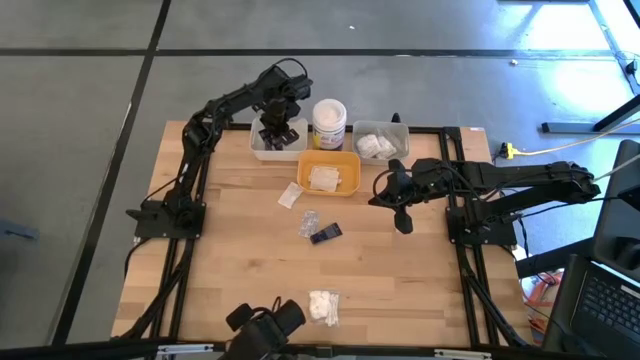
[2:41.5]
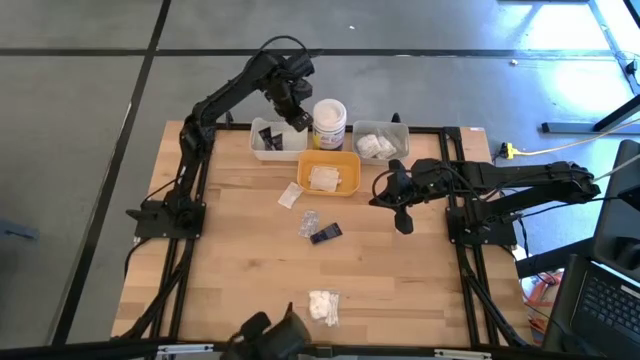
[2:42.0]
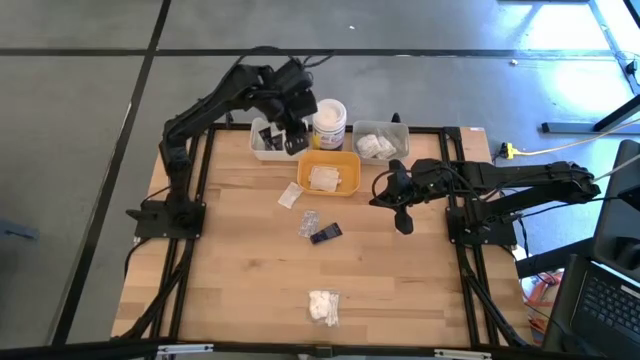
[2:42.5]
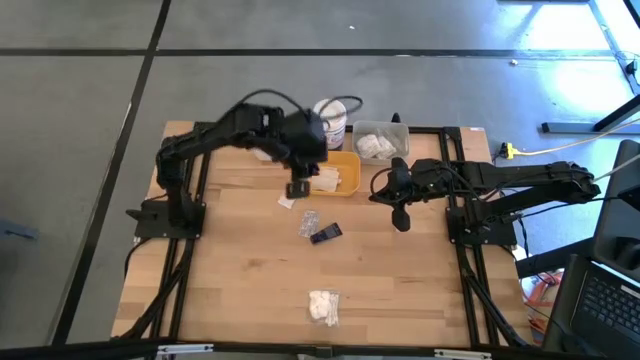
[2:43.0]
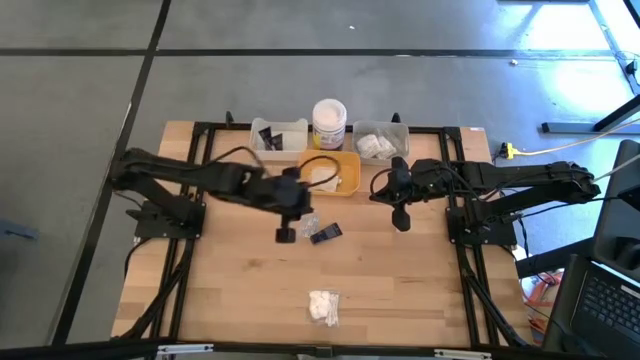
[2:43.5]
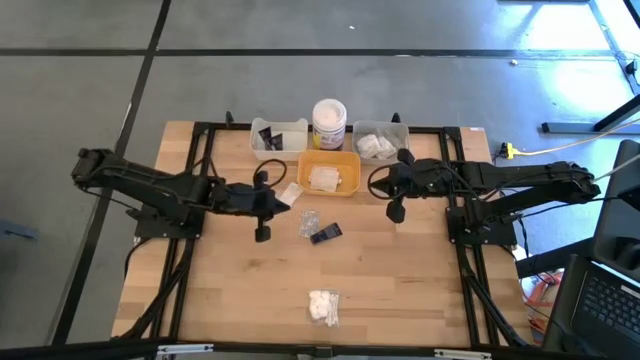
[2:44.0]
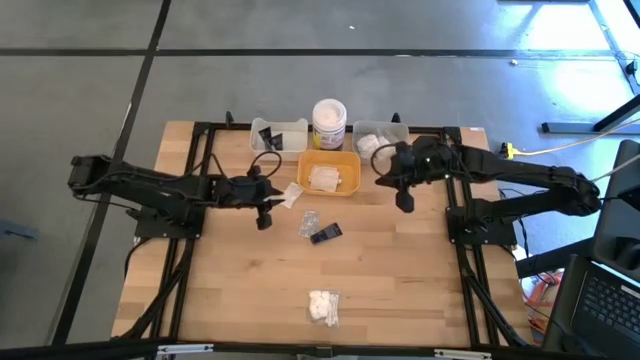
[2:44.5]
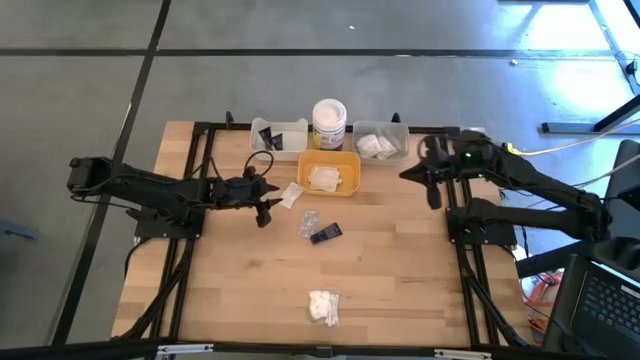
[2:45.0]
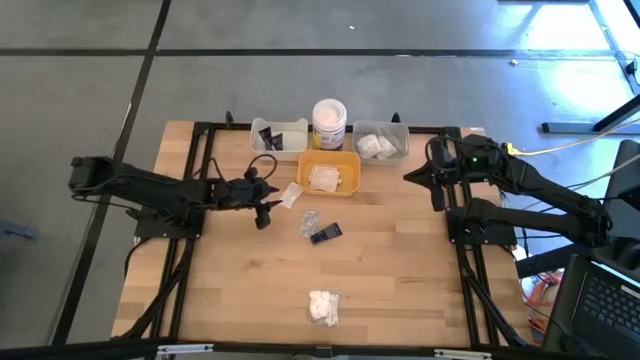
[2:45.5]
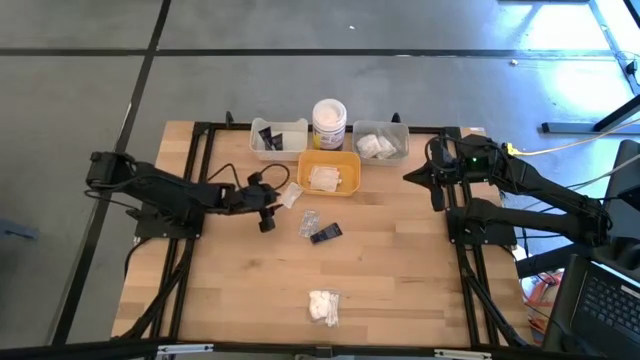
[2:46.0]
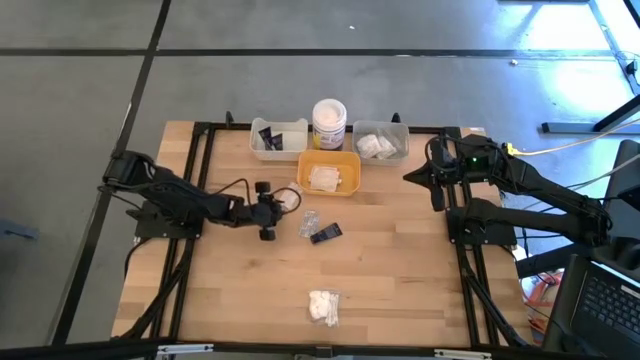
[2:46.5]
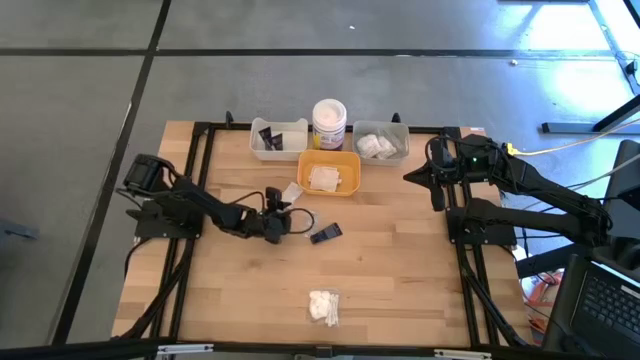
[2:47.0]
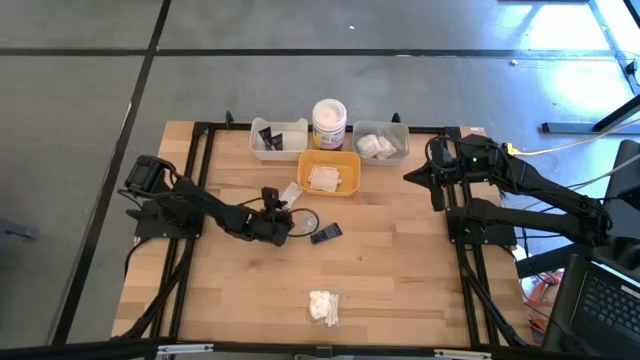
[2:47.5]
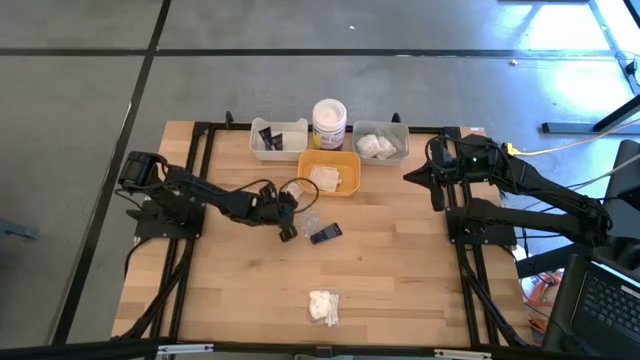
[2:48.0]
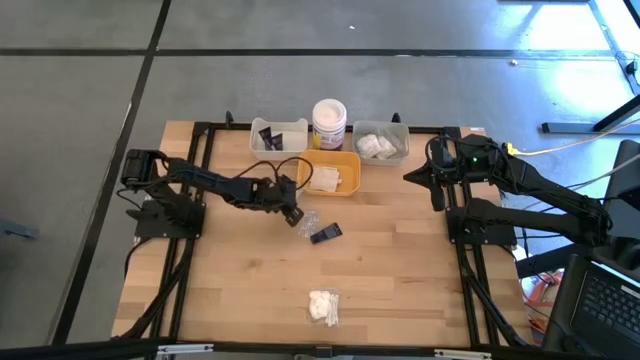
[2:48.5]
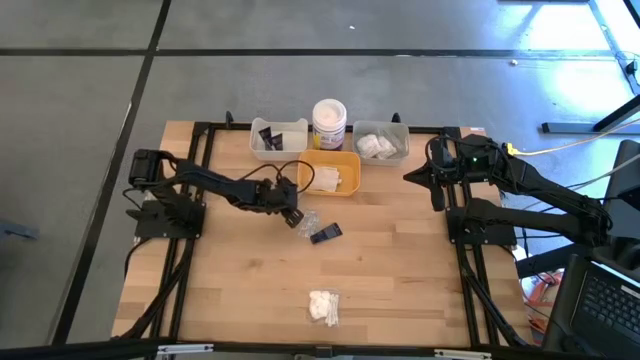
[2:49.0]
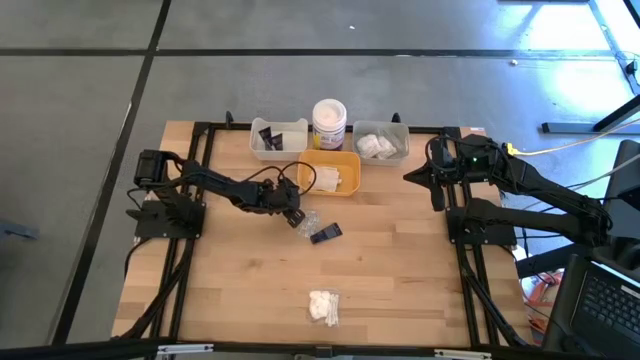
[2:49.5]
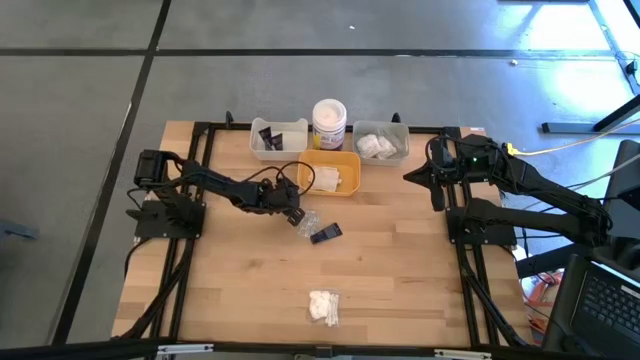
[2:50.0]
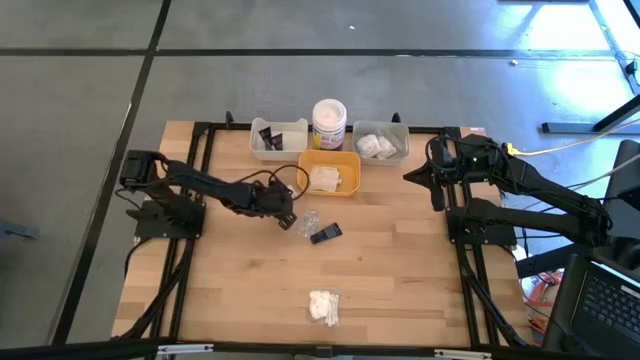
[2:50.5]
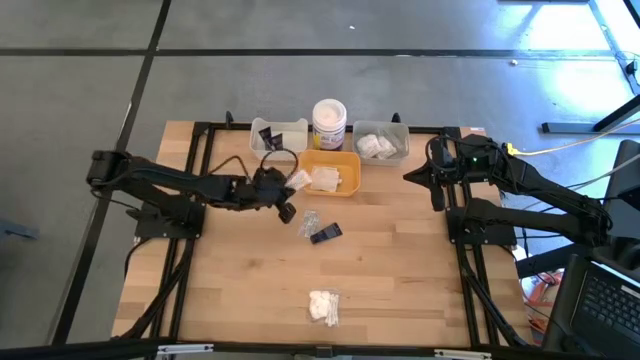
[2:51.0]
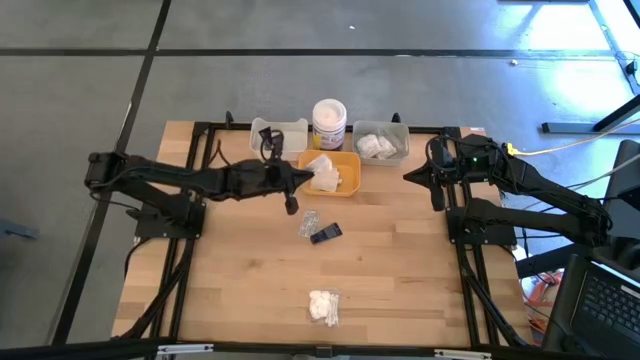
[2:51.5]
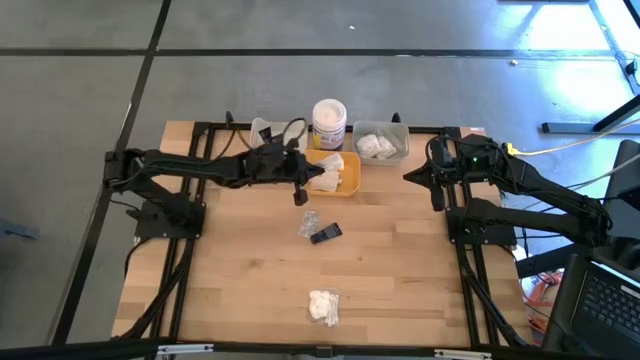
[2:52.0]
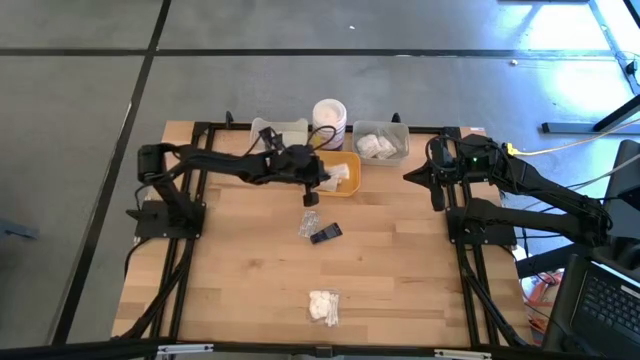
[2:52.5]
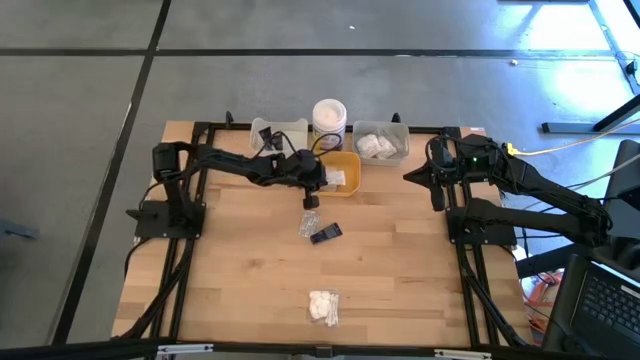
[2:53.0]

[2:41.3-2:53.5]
Task: Pick & Place Travel size toiletries
Put the white bandage into the yellow bin

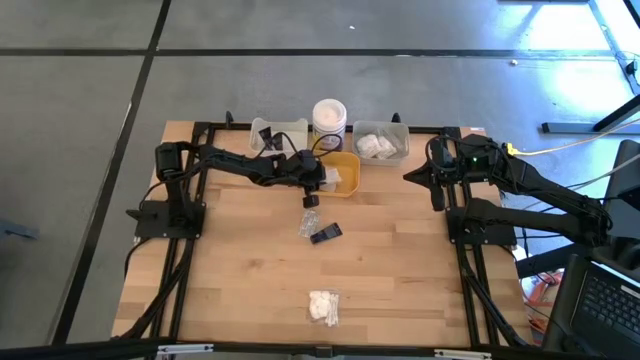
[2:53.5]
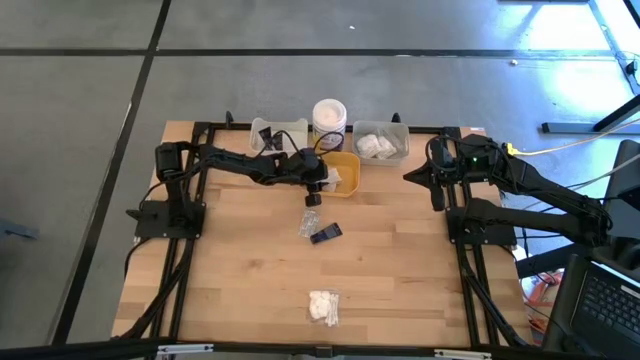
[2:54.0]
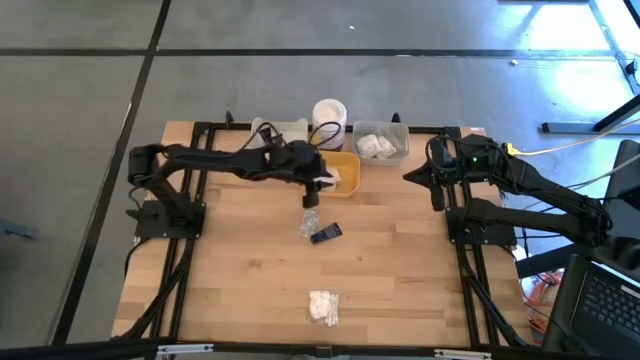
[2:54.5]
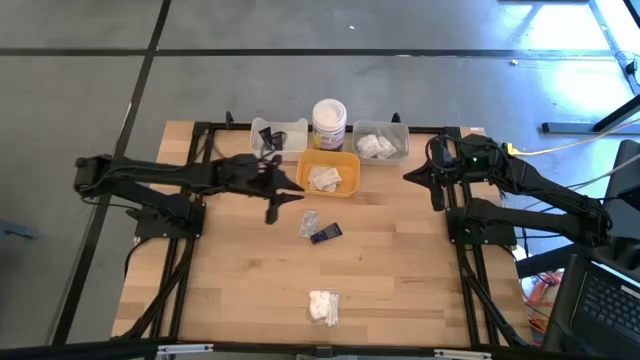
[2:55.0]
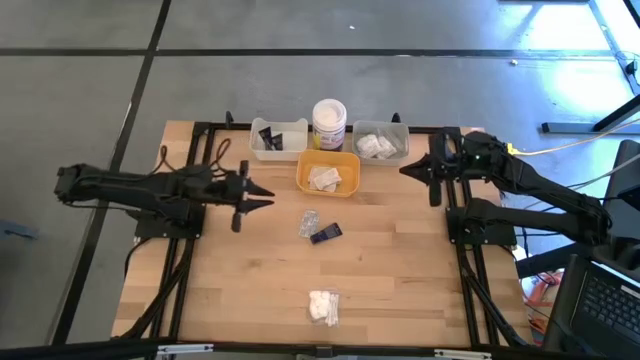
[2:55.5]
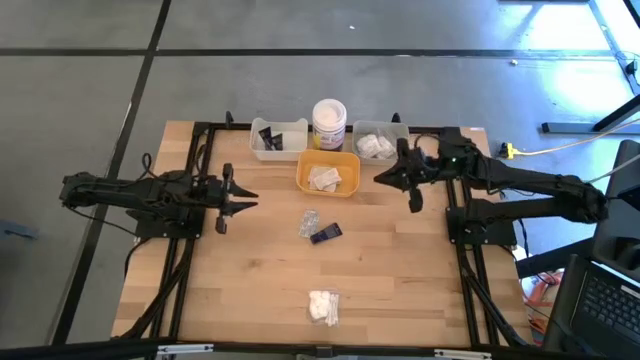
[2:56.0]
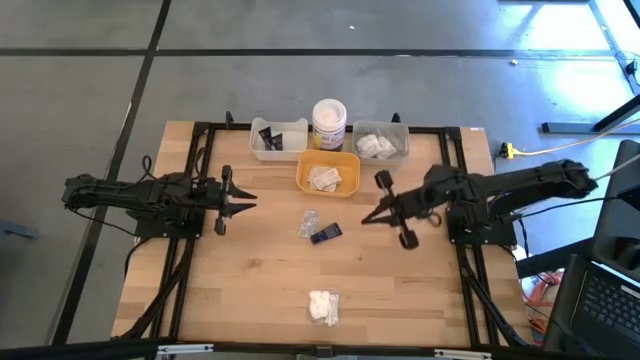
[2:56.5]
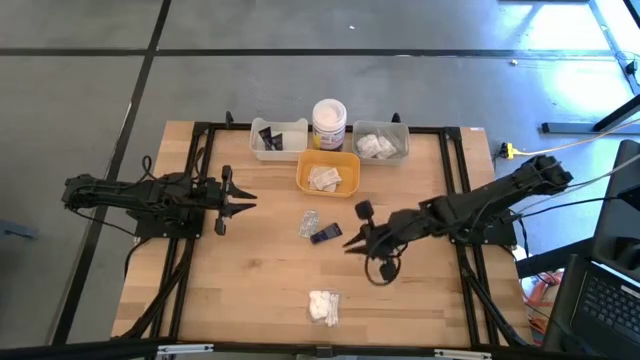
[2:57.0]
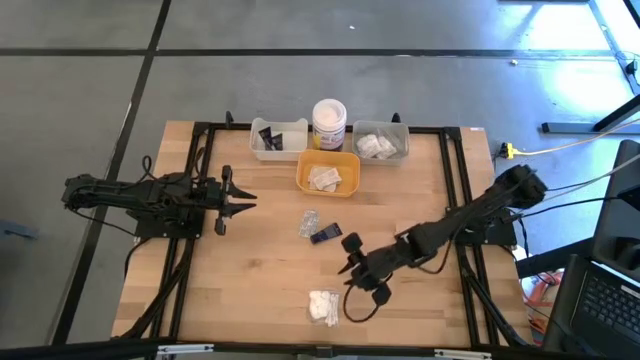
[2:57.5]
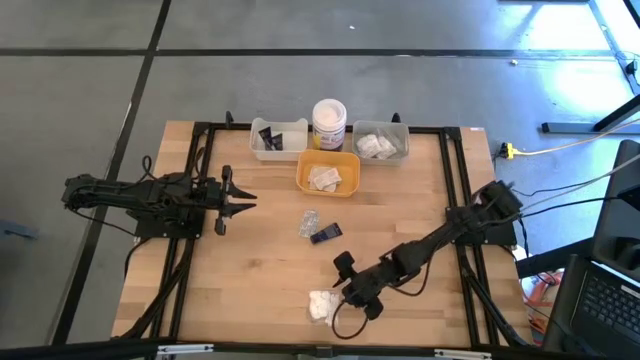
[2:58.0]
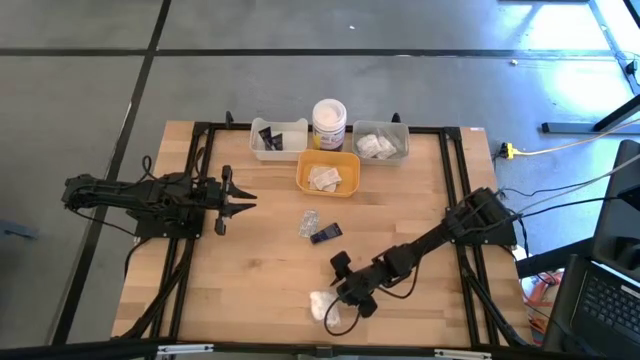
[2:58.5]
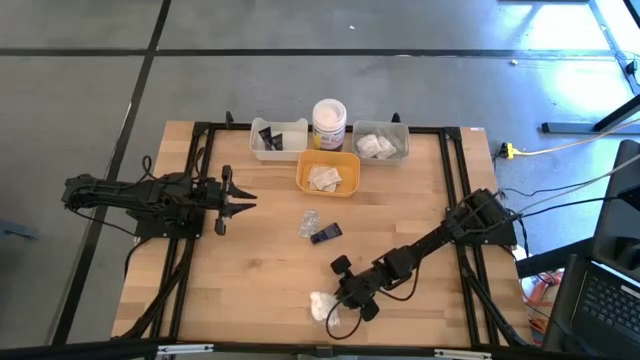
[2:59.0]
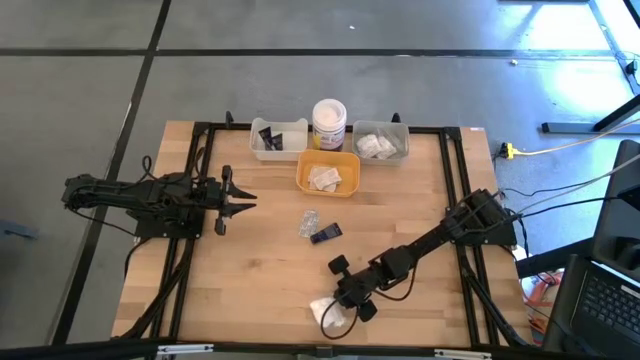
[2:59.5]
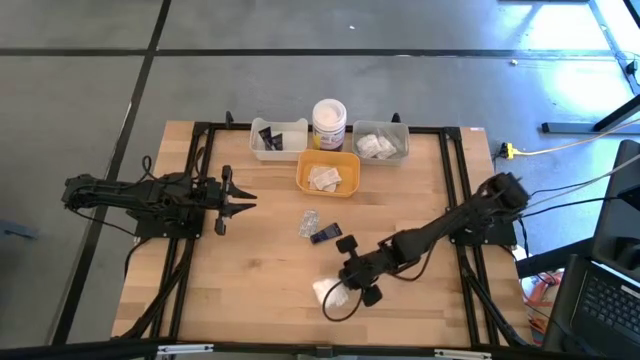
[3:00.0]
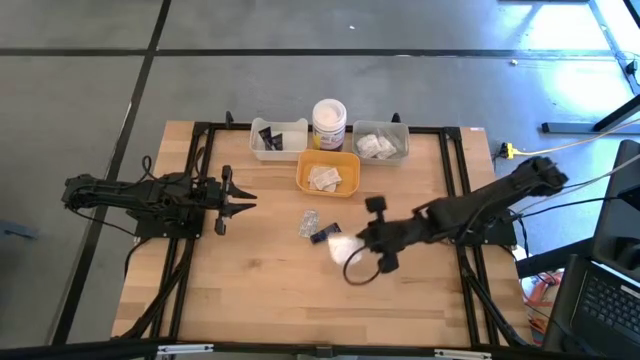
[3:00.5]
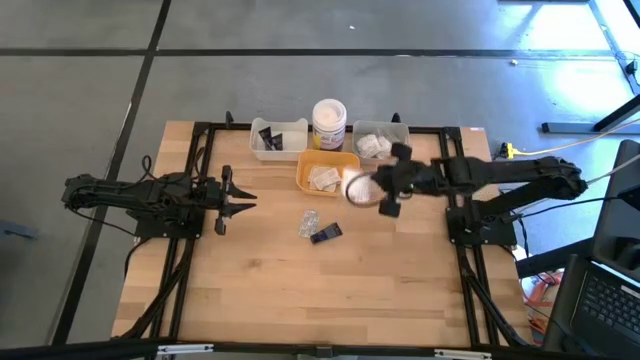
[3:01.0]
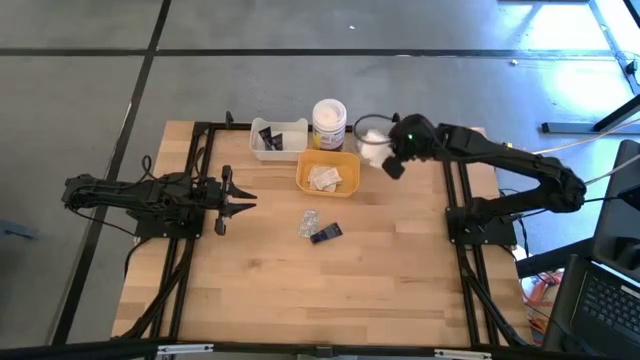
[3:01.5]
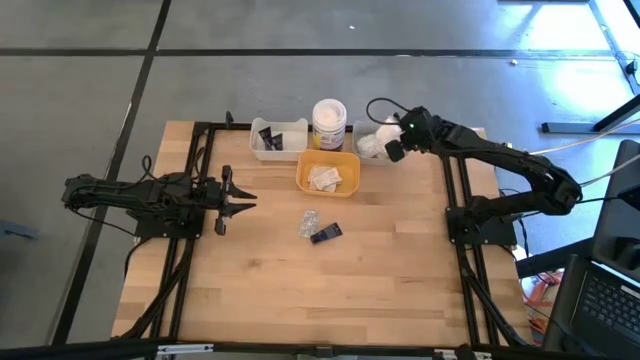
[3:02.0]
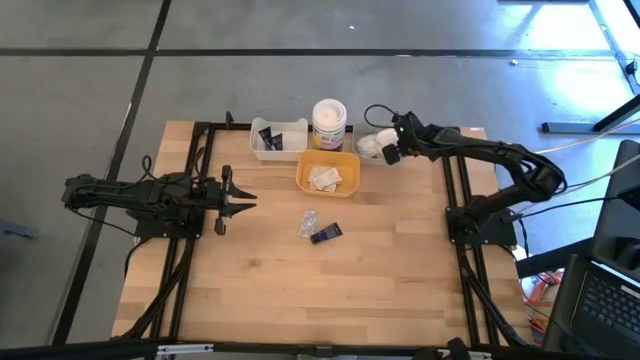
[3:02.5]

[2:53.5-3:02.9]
Put the white cotton pack into the gray bin

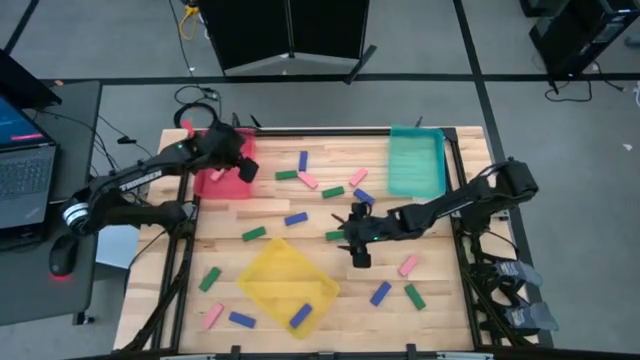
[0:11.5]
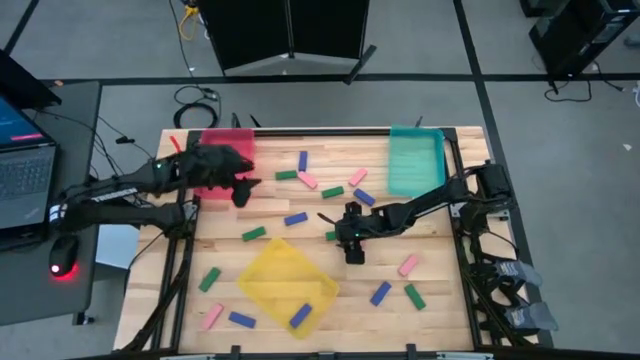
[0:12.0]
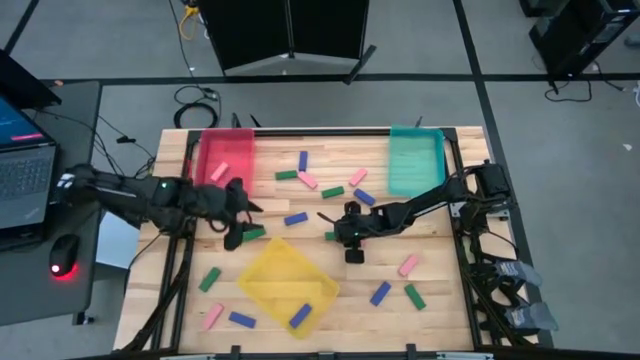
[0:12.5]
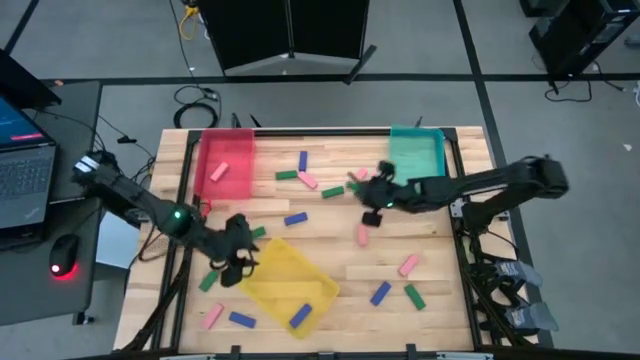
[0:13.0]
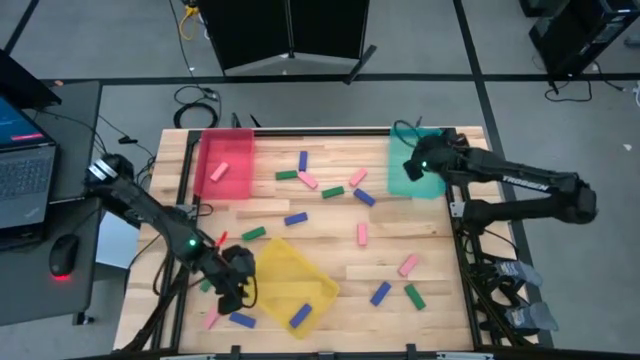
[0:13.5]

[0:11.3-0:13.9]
Task: Sort blocks
Put the green block into the blue bin
